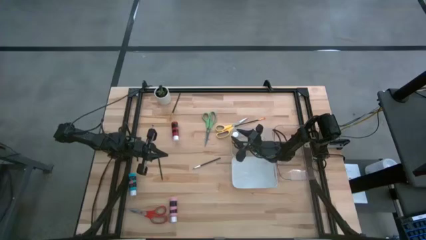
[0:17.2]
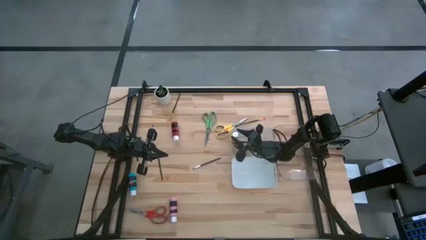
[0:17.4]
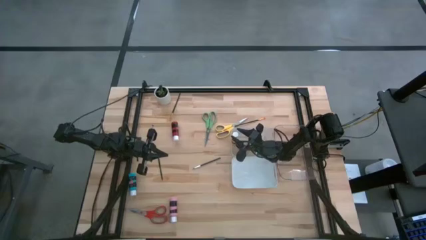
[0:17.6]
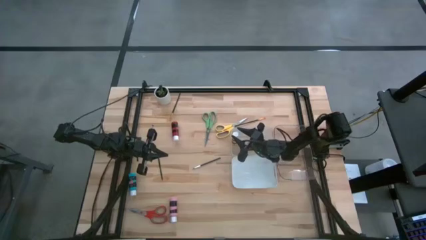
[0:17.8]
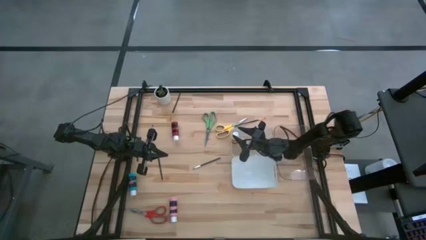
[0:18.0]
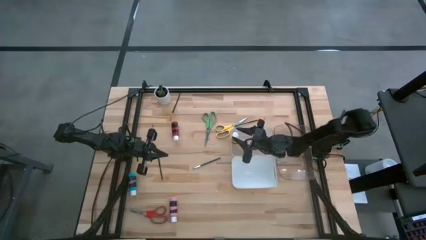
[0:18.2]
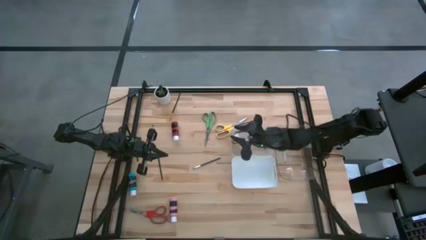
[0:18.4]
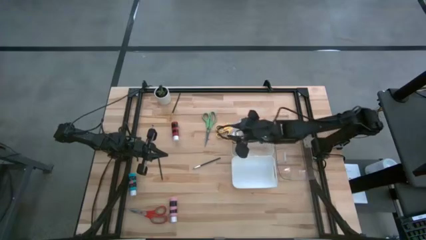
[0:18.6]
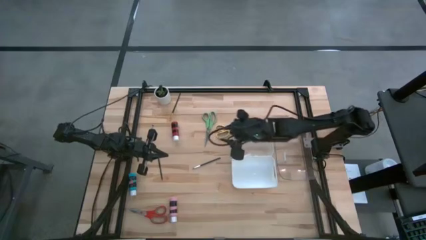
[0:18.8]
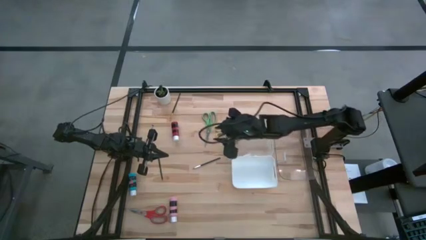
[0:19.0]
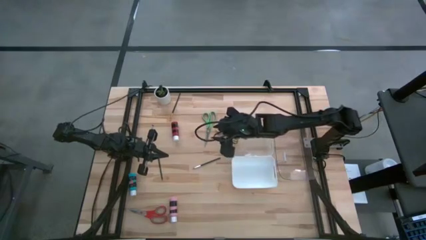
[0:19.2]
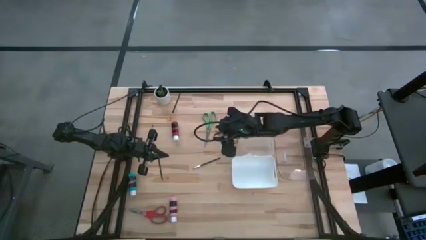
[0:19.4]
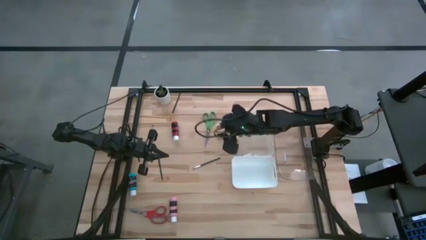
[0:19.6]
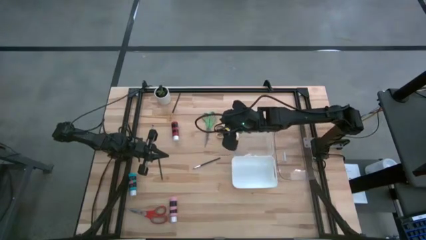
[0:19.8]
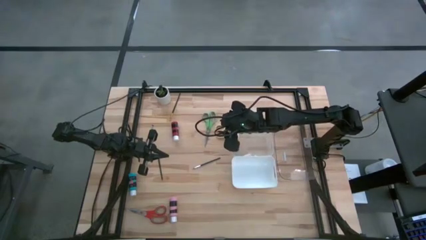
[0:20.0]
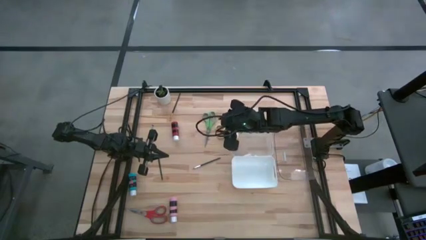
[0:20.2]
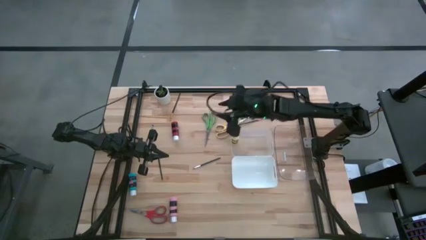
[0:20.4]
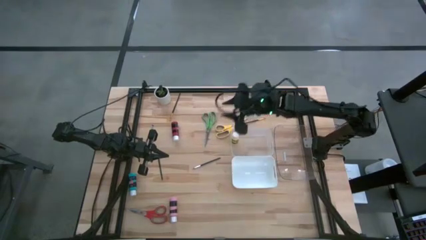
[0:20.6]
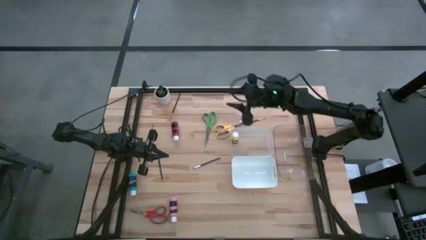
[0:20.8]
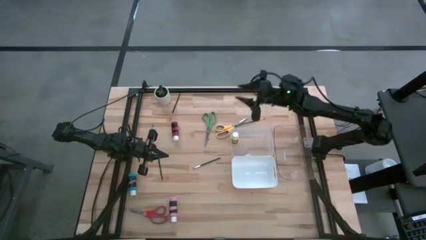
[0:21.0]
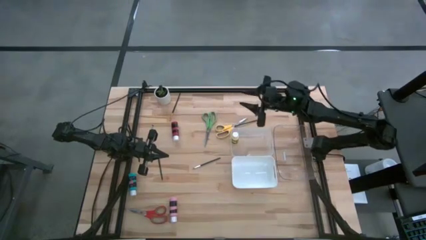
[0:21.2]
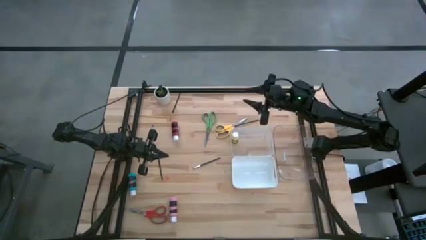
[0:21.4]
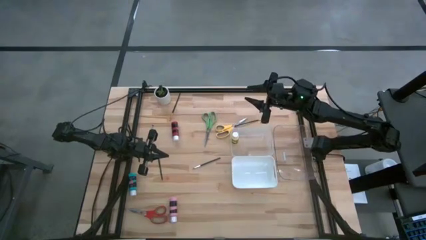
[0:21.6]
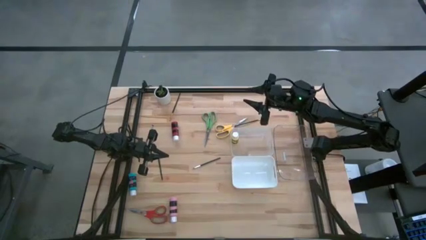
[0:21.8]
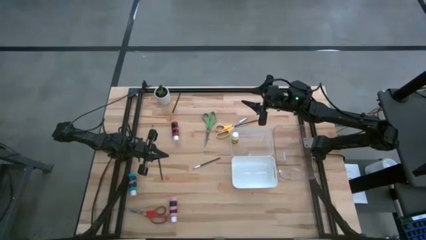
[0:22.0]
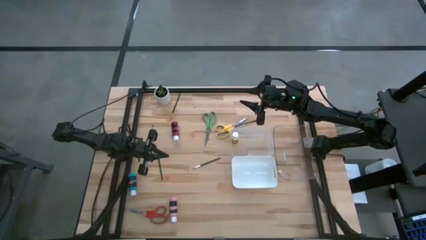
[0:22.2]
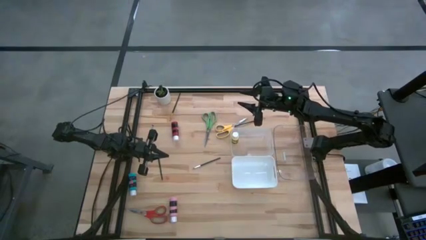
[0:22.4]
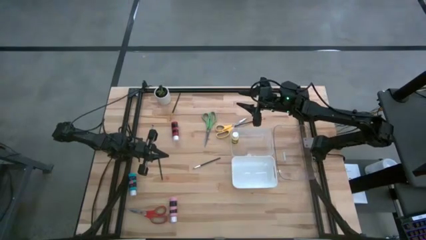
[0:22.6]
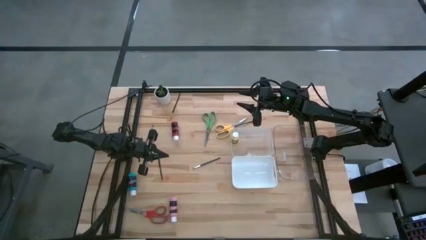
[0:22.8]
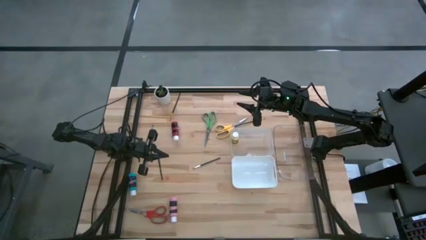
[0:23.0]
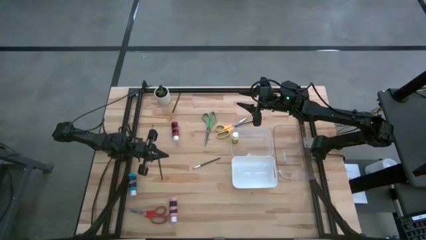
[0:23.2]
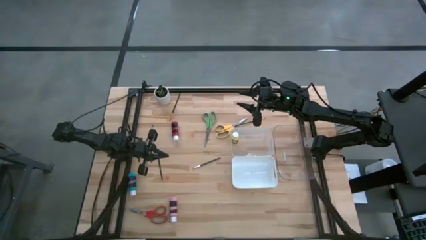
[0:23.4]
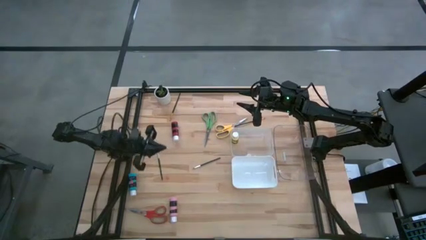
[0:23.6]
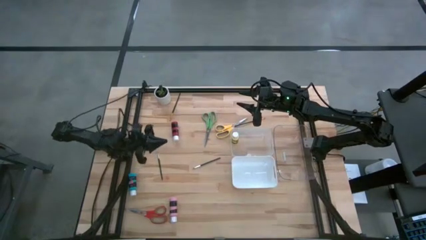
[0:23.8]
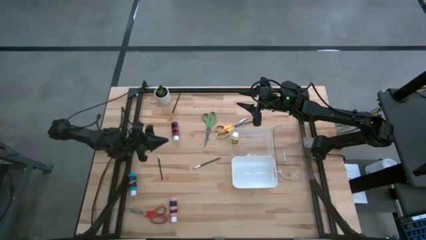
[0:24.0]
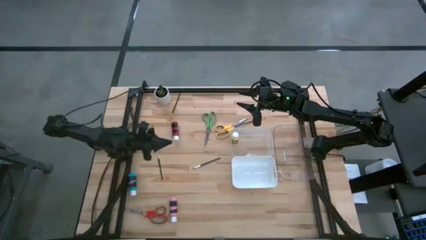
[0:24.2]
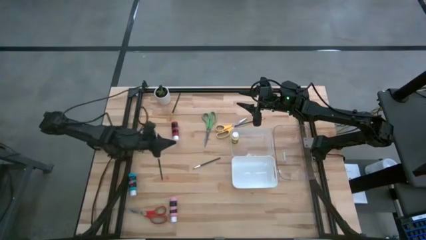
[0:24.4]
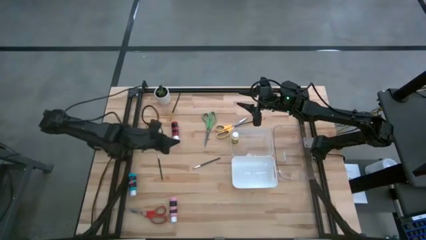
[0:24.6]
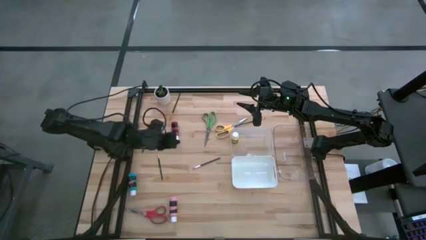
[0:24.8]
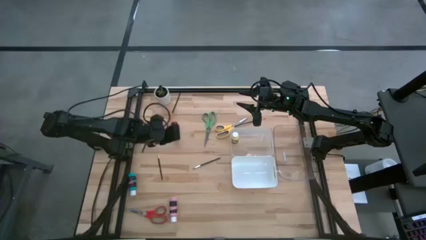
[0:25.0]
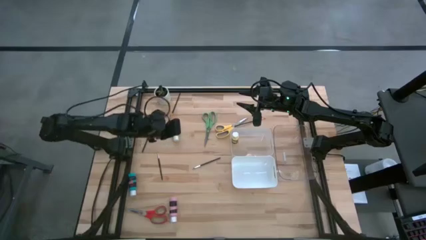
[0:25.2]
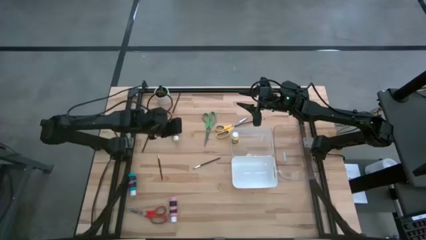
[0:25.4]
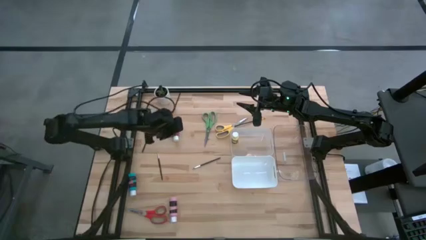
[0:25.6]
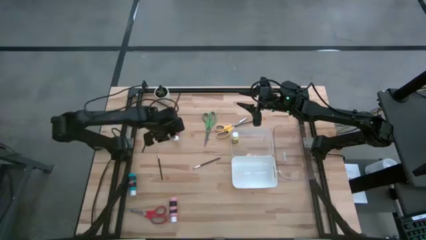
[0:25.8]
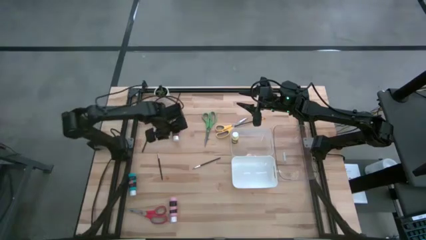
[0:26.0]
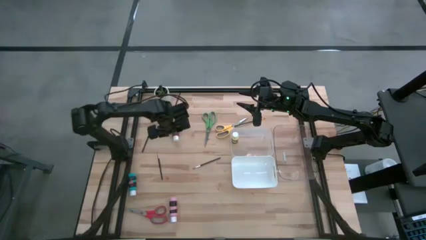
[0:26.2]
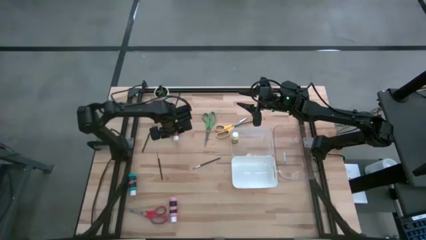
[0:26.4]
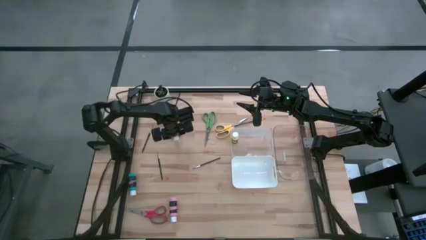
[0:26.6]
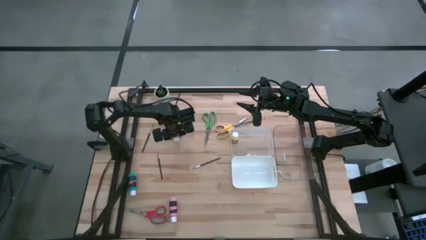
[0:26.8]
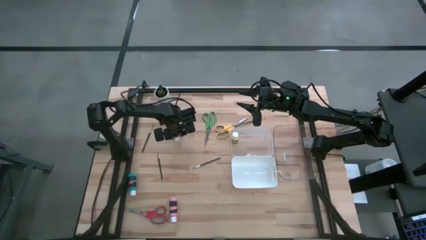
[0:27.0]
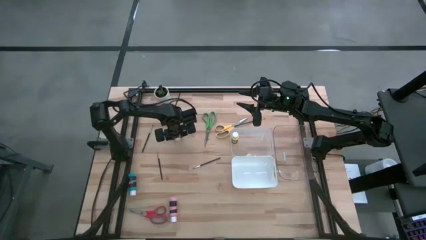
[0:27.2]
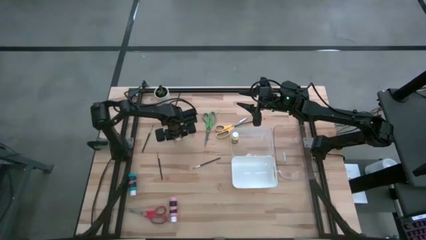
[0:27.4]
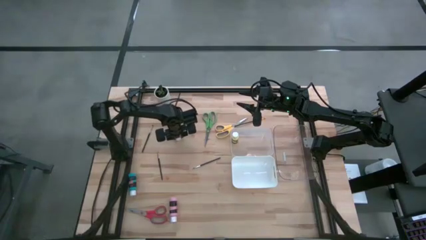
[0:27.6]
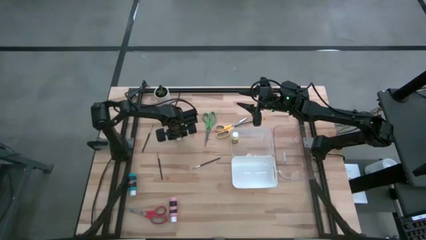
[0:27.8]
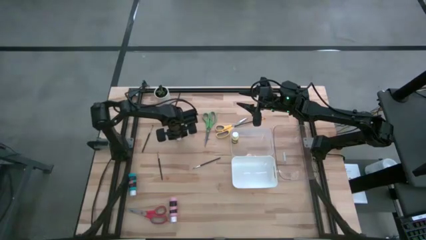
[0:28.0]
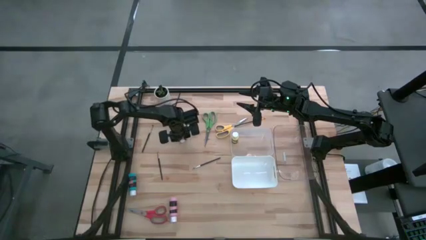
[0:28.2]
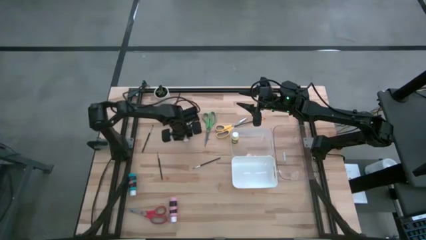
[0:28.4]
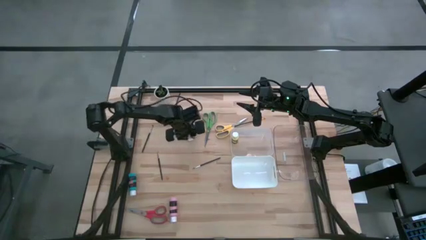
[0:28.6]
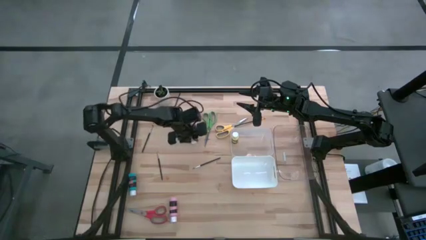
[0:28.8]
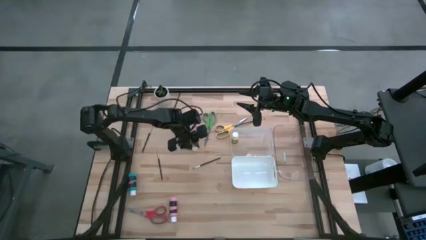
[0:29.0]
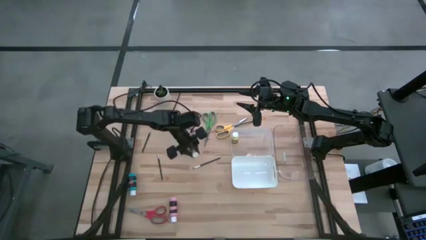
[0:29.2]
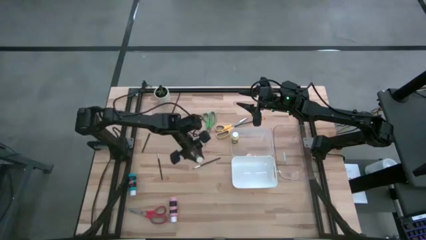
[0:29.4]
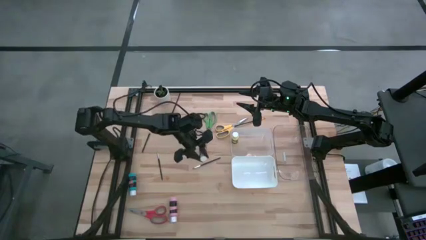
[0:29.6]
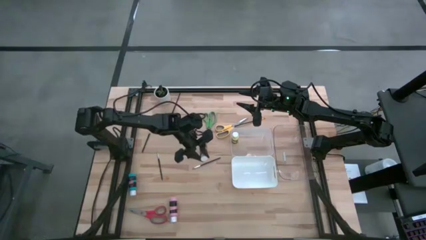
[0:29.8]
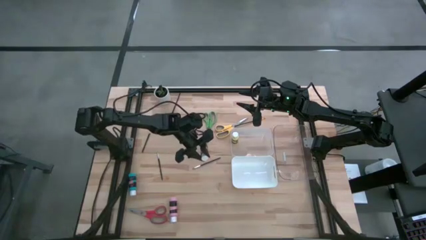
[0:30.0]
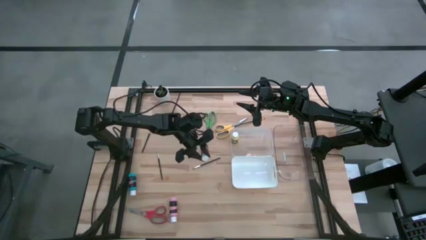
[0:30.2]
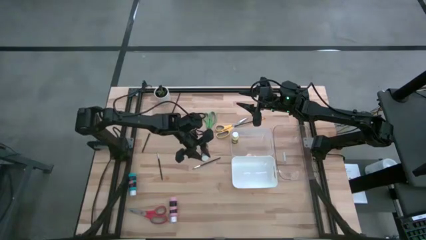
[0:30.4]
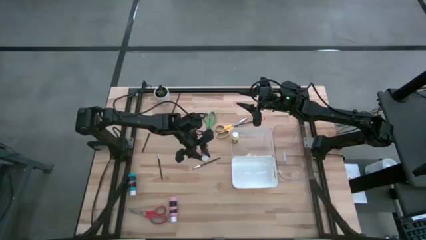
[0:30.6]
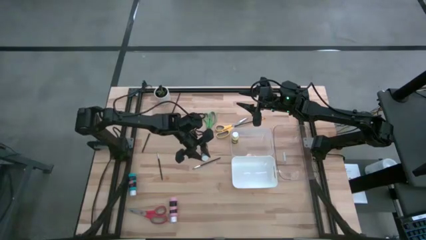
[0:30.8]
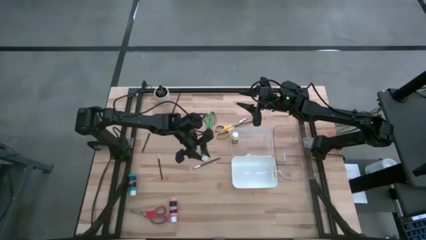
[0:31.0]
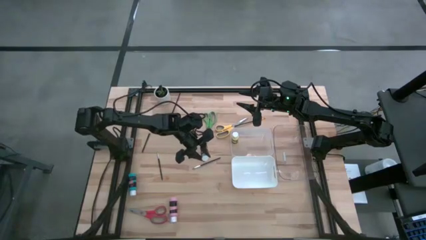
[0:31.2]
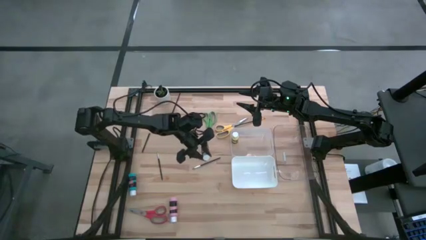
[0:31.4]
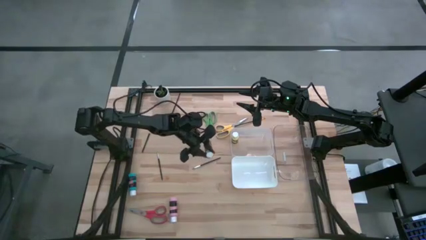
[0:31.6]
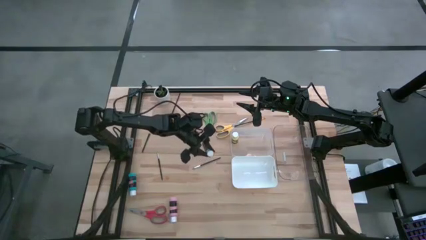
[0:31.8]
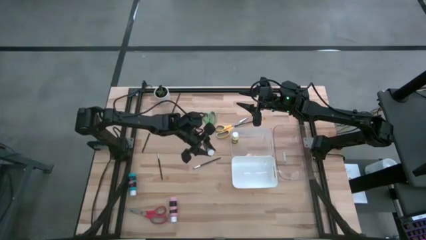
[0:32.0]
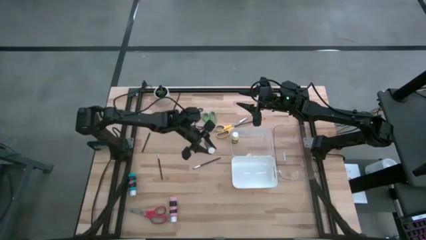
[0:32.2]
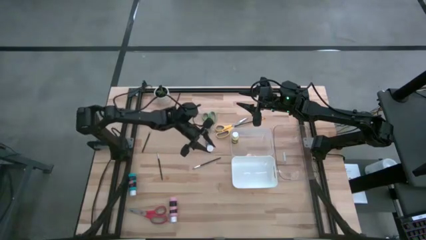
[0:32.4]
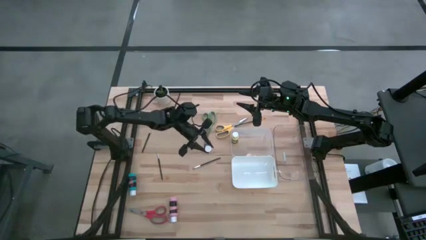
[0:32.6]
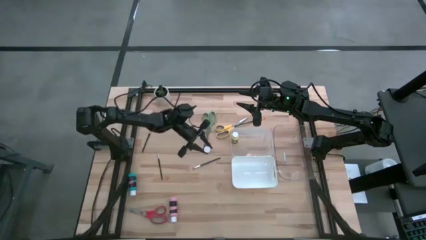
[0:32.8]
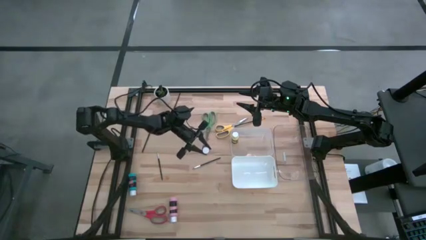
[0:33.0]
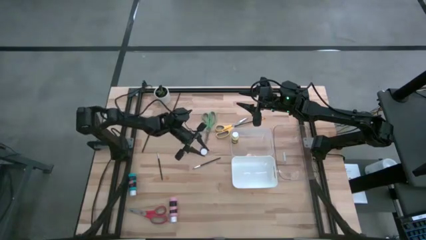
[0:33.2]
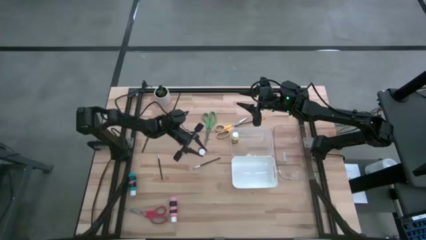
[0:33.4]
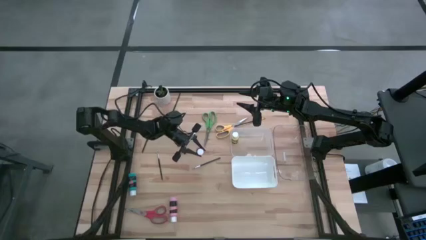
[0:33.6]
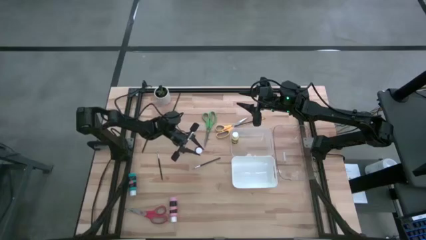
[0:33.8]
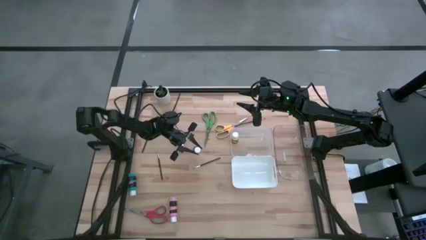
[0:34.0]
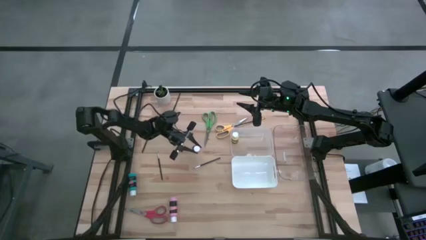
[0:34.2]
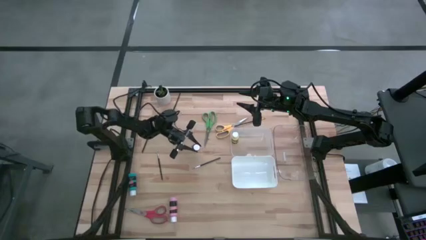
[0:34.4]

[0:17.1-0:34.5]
Task: Pick & Place Paint Supplies
Put the red paint bottle into the left transparent bin
